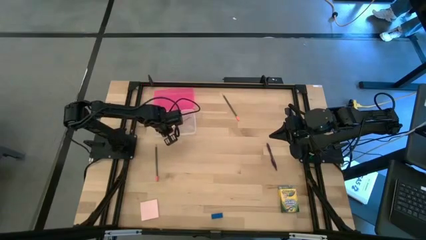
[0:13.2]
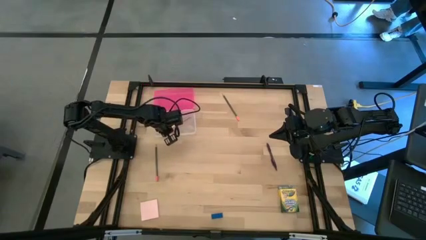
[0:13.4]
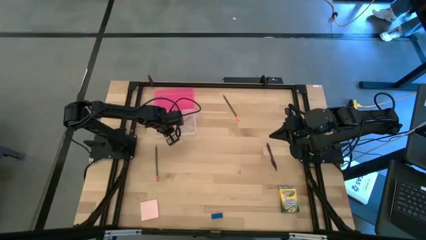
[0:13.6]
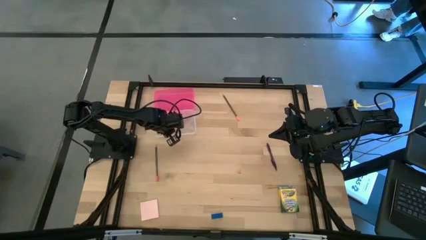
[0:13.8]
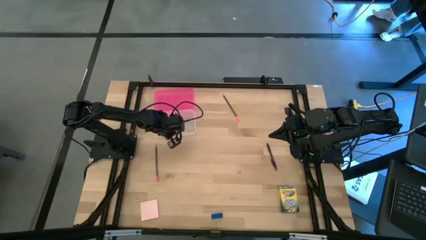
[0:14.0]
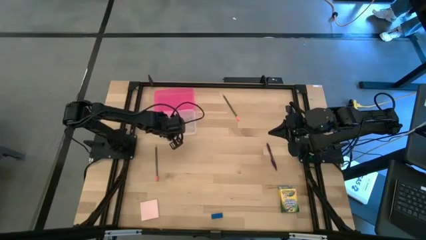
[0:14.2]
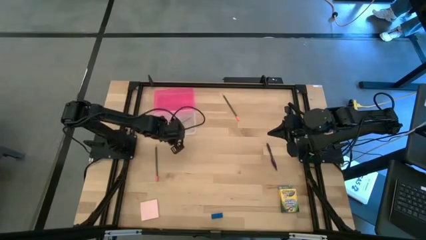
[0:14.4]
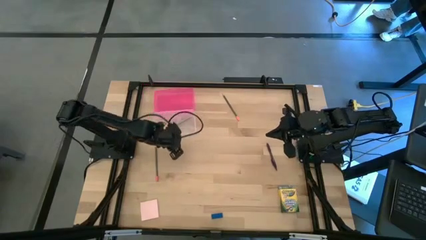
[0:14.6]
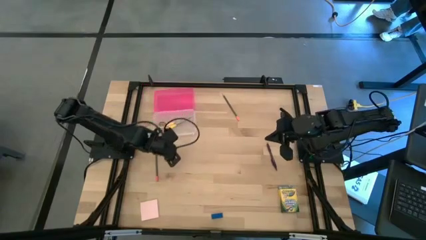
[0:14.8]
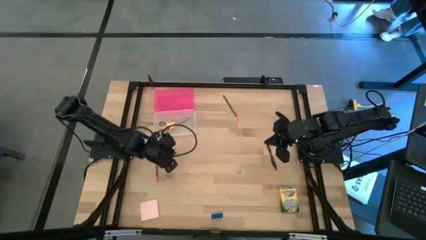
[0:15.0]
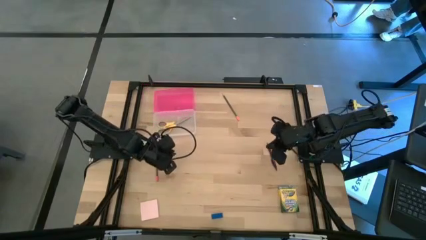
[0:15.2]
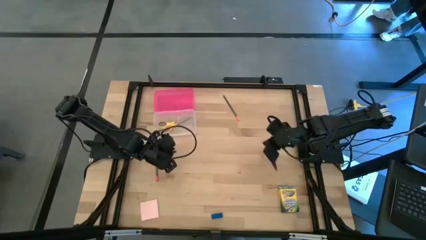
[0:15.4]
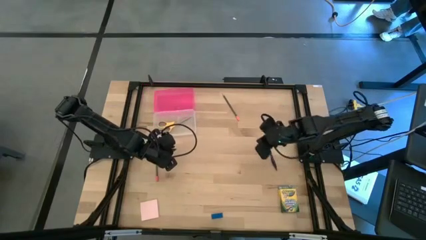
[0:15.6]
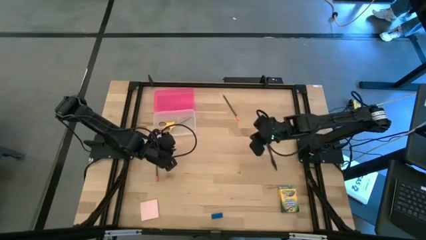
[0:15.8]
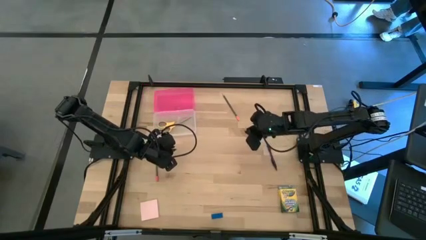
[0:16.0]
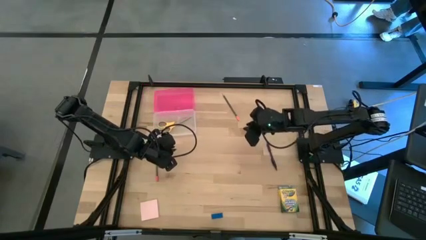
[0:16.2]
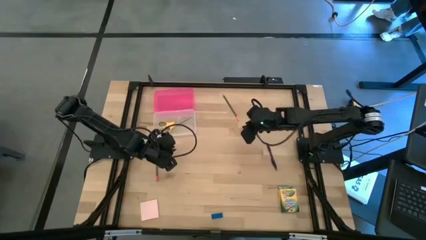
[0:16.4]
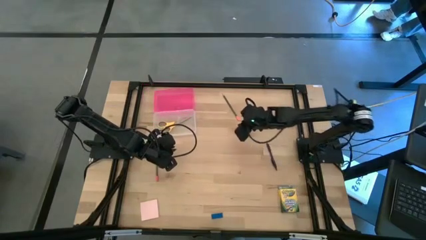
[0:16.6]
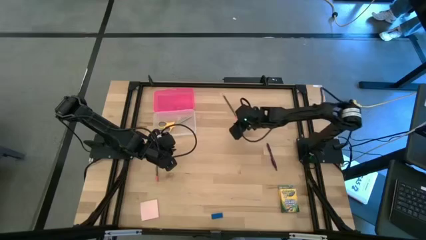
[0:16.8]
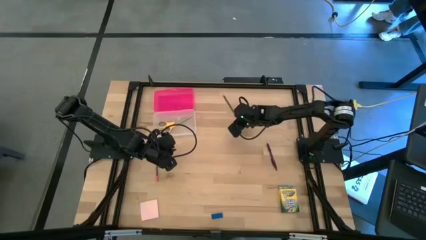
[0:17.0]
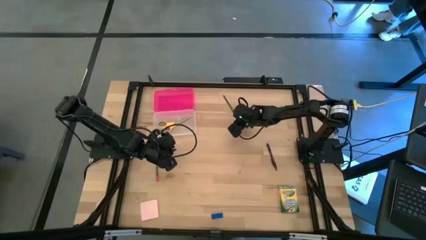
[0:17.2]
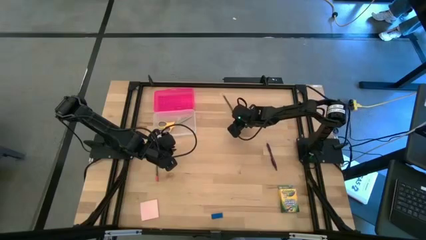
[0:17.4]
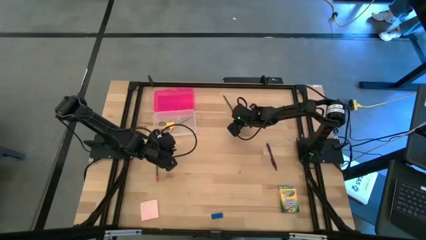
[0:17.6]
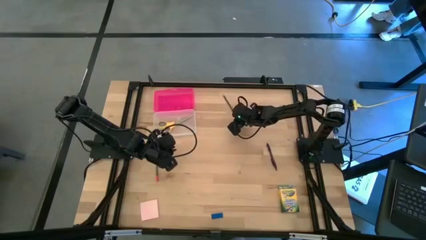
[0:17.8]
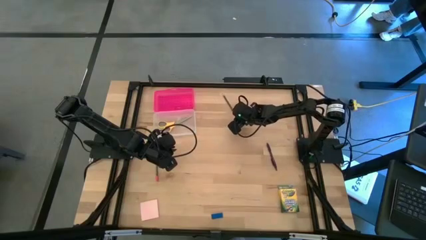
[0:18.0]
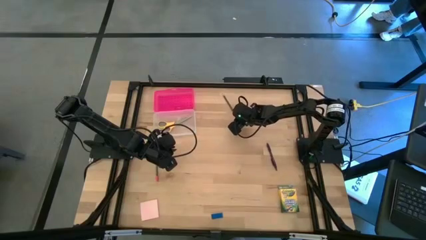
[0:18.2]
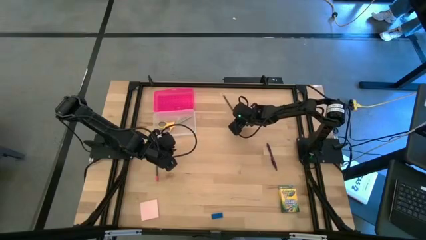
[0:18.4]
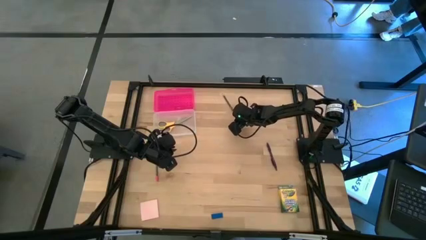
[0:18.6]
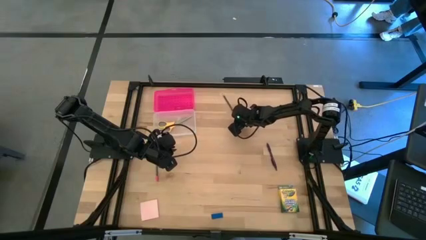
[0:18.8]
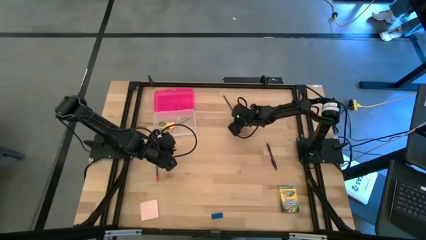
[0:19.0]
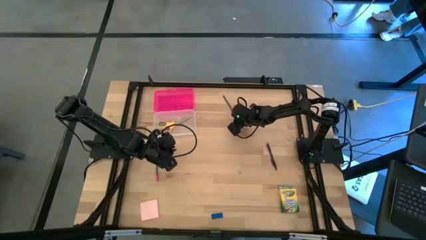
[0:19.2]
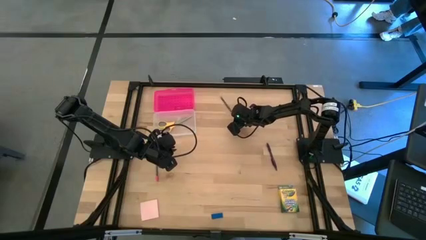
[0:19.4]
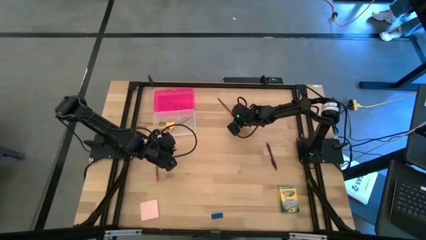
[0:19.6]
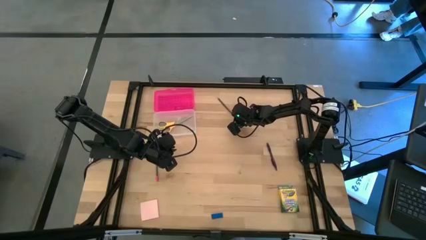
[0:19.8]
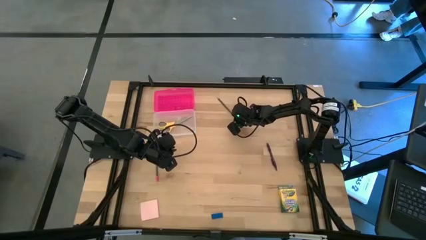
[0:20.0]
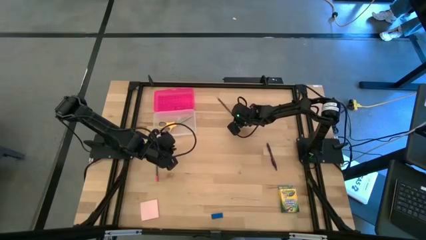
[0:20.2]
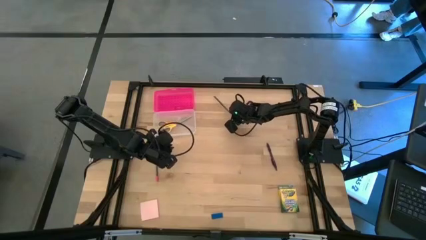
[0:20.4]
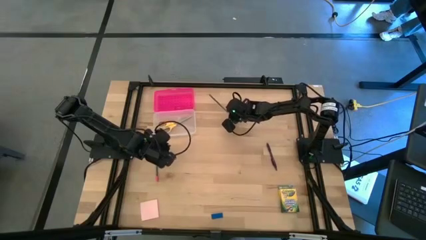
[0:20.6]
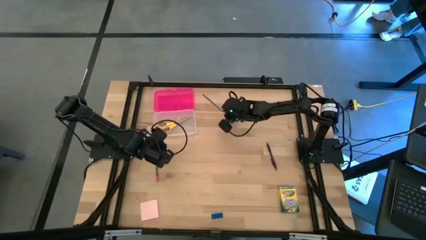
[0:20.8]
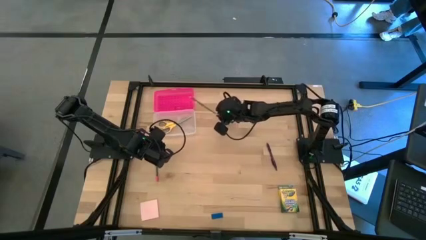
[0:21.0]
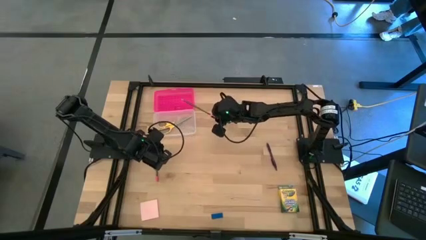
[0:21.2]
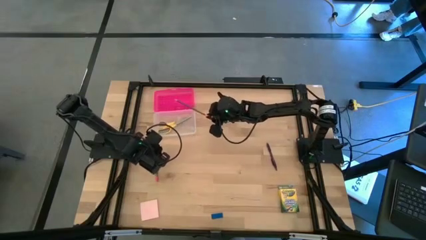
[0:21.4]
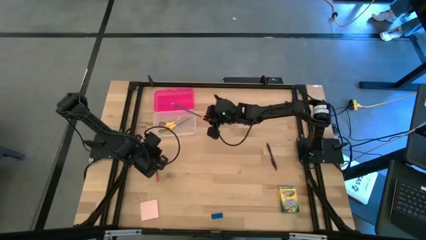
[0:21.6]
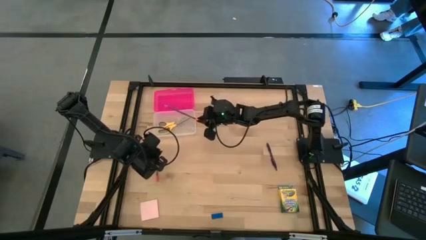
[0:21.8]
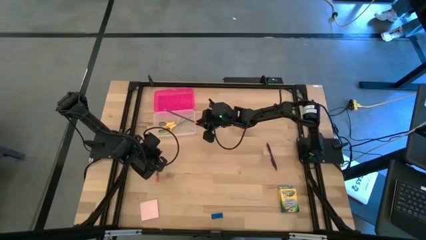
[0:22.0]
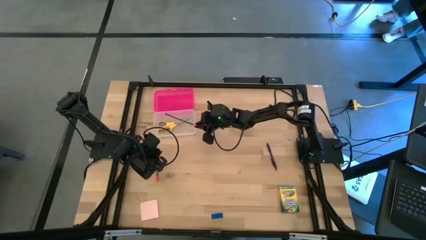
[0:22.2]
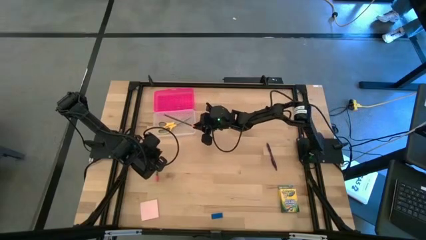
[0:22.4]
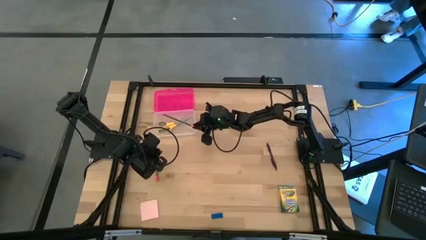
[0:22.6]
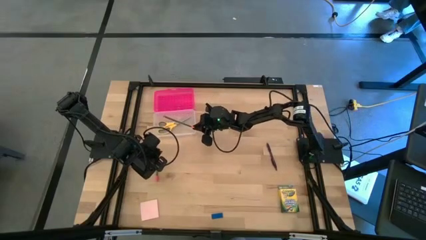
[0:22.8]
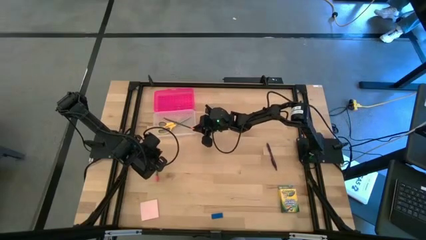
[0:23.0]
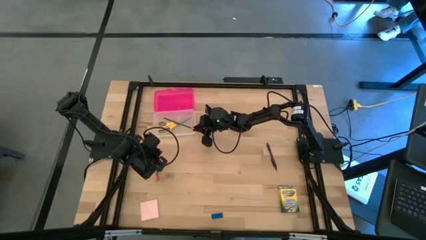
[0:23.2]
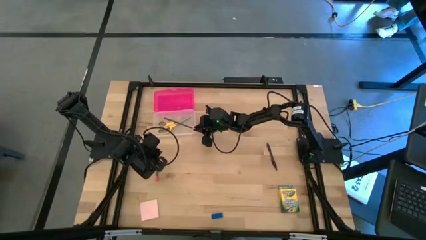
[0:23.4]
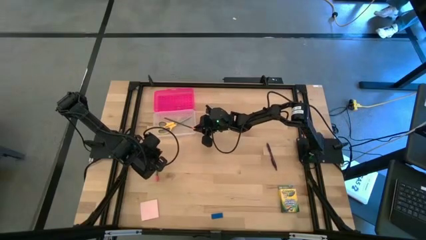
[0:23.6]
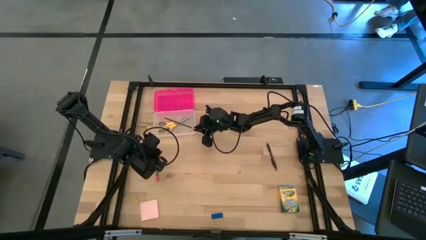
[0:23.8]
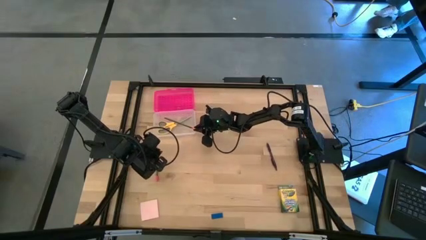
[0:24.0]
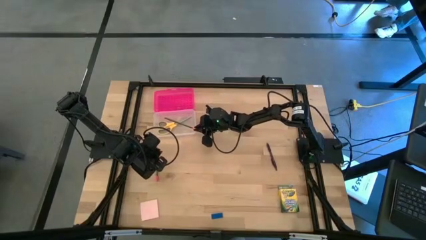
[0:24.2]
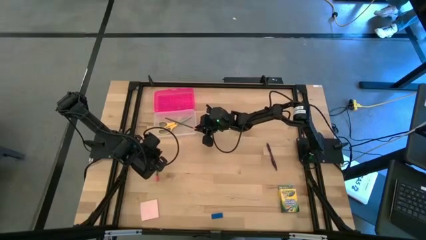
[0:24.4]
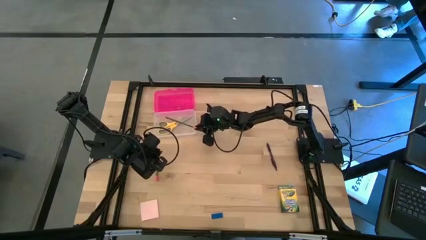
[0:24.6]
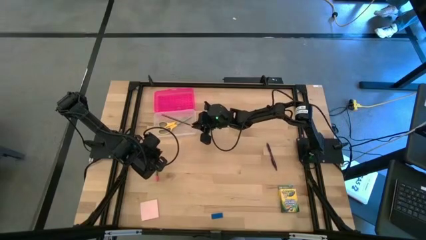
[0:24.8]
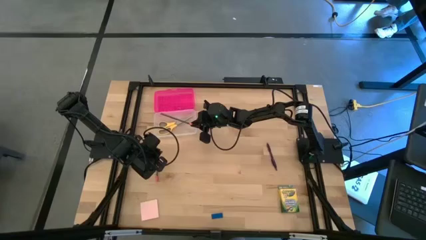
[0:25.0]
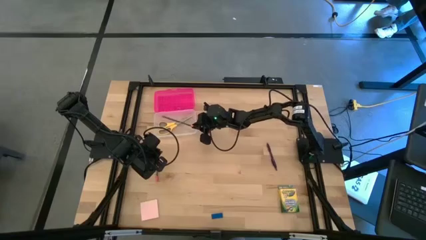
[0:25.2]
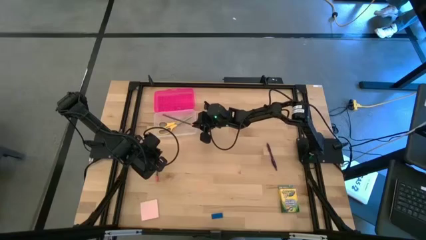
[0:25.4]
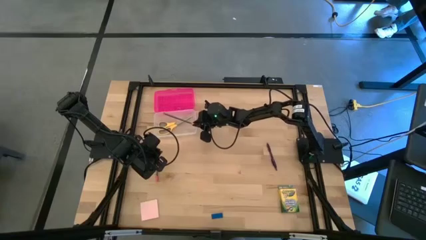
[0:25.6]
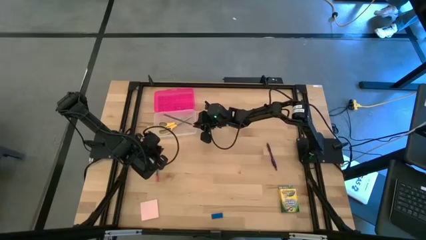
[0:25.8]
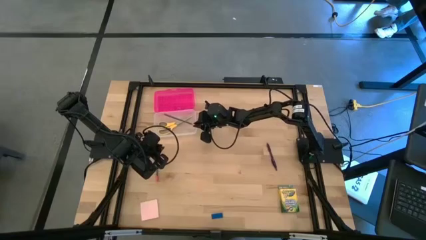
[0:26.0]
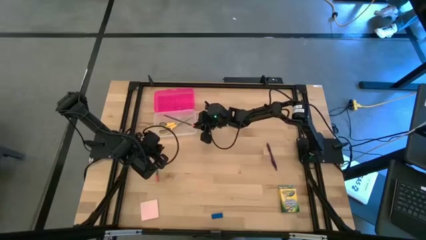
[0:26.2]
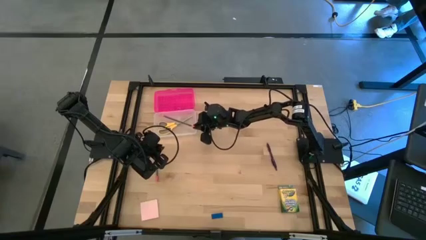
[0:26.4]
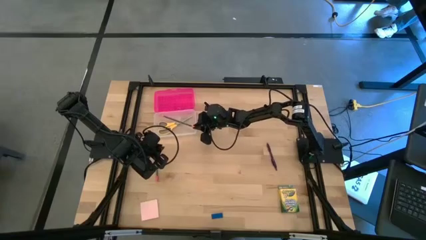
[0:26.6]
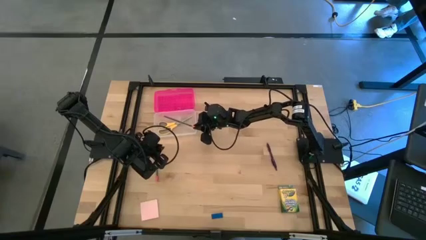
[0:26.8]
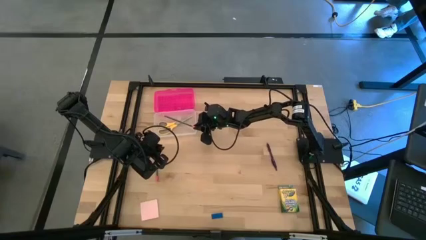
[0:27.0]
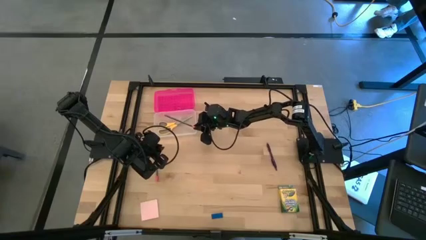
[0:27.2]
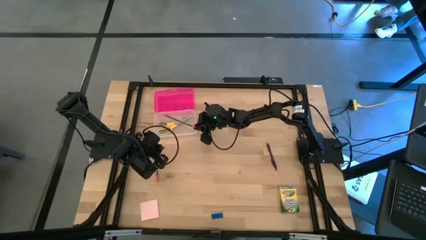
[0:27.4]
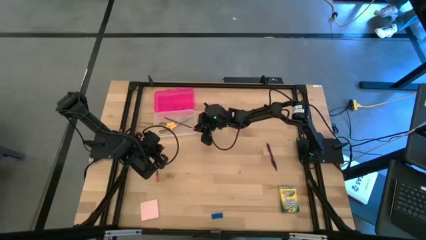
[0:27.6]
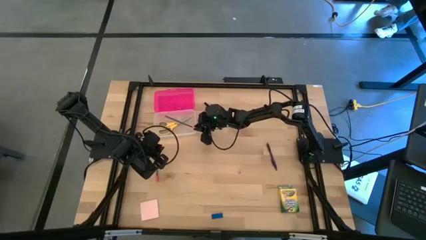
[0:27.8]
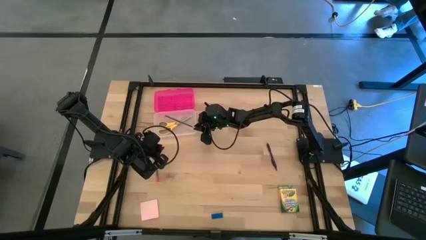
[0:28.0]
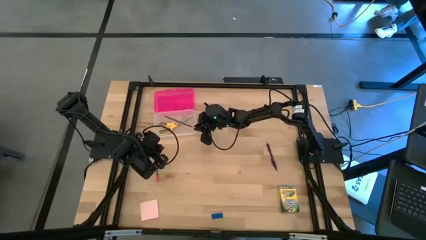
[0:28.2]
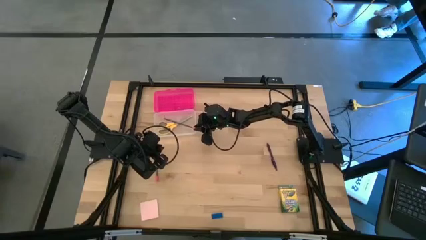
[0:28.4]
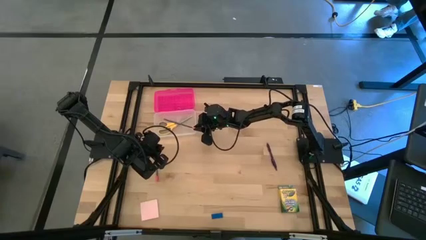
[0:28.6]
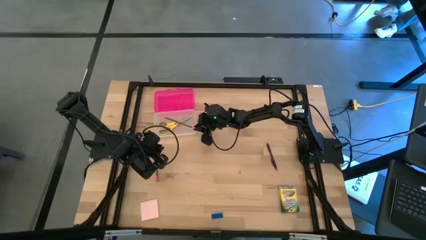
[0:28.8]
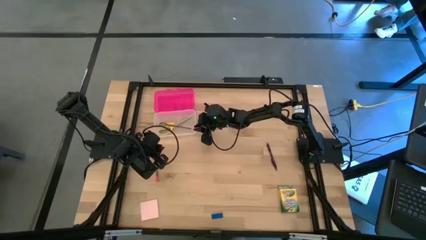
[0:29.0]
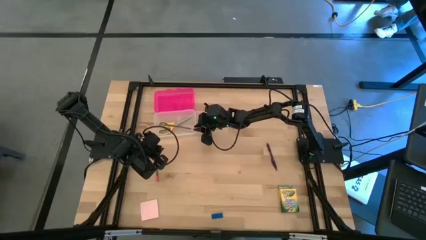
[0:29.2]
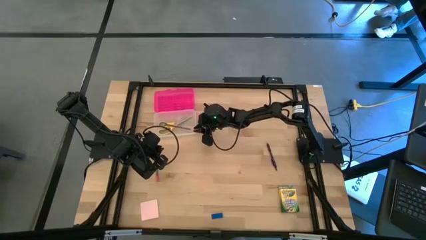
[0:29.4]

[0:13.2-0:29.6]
Task: Pack school essentials
Put the top black pencil into the pink supply box
